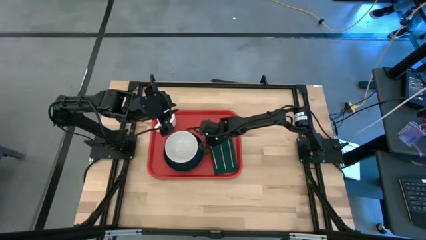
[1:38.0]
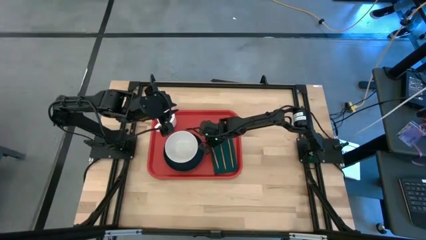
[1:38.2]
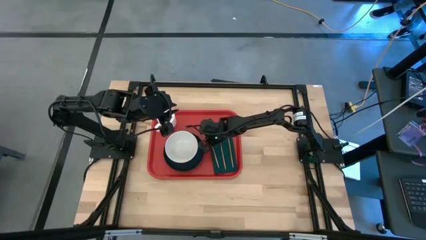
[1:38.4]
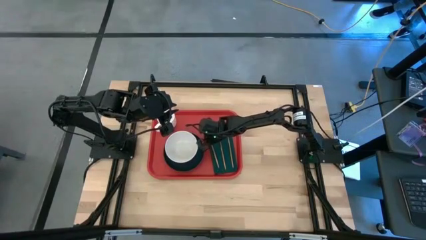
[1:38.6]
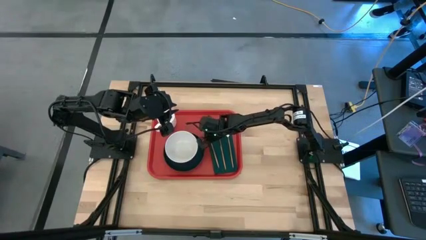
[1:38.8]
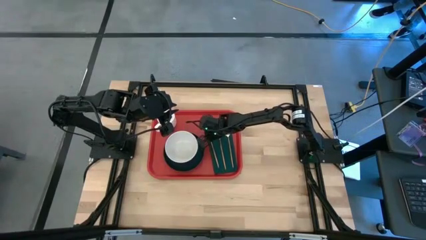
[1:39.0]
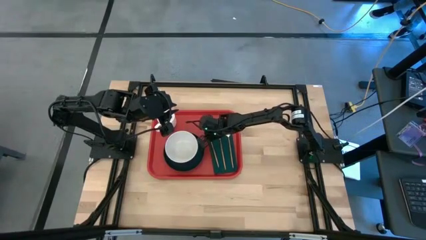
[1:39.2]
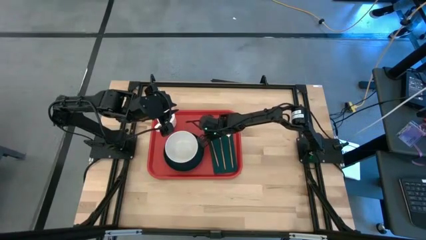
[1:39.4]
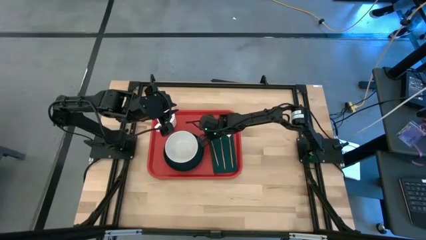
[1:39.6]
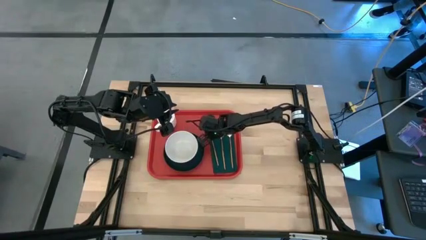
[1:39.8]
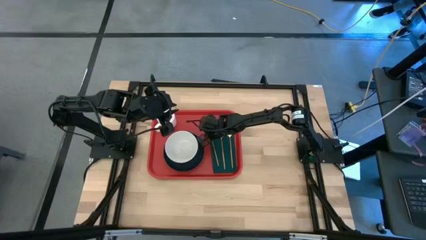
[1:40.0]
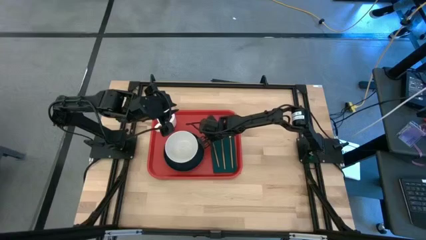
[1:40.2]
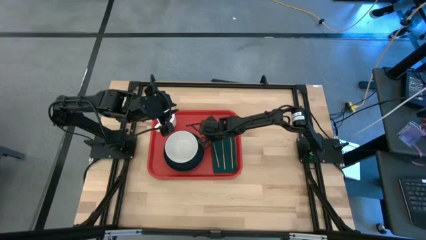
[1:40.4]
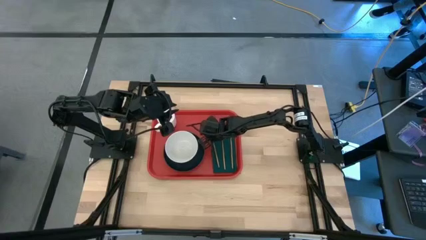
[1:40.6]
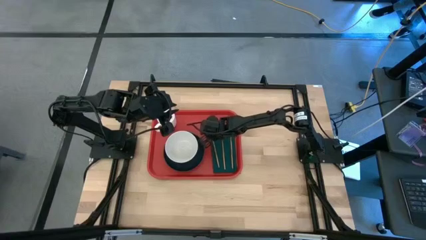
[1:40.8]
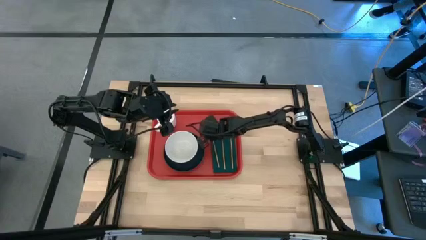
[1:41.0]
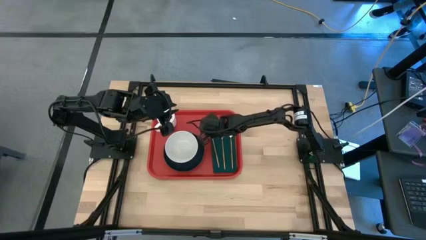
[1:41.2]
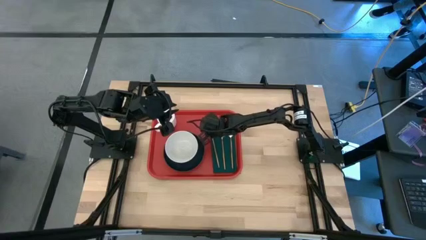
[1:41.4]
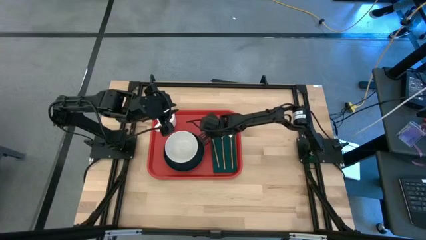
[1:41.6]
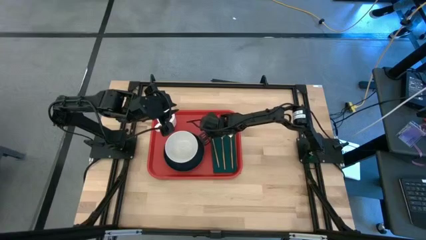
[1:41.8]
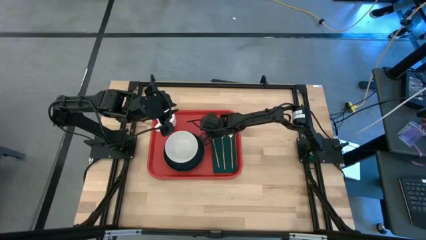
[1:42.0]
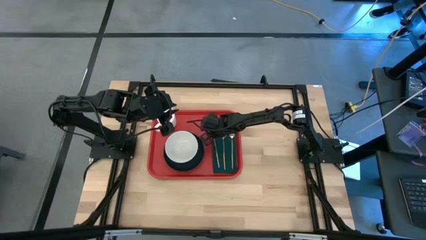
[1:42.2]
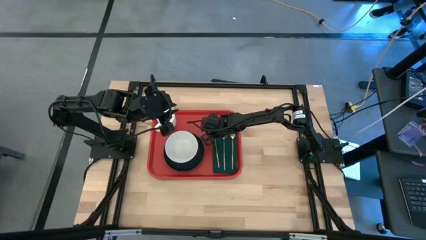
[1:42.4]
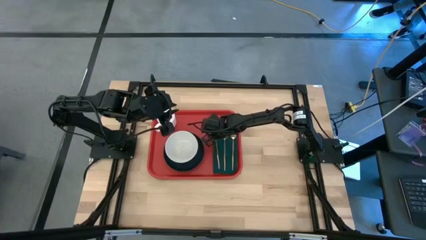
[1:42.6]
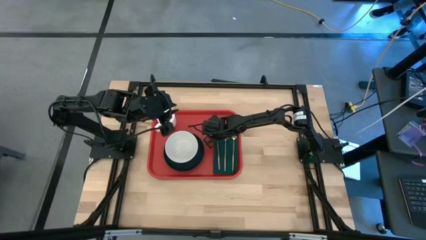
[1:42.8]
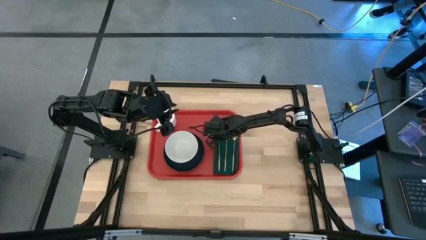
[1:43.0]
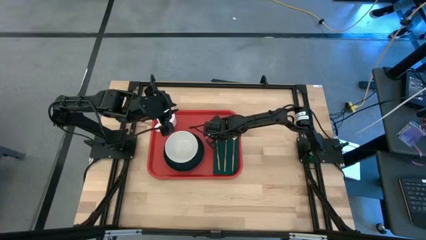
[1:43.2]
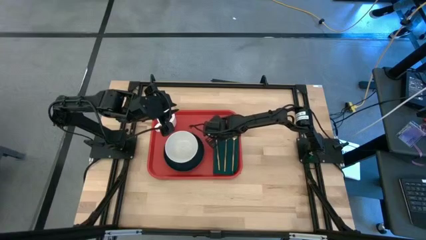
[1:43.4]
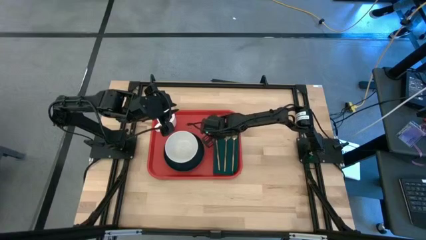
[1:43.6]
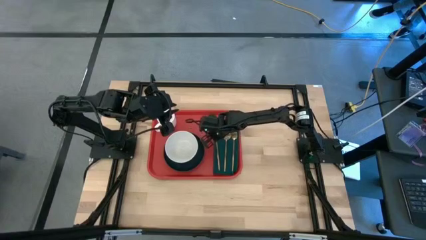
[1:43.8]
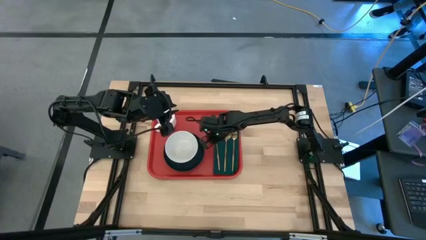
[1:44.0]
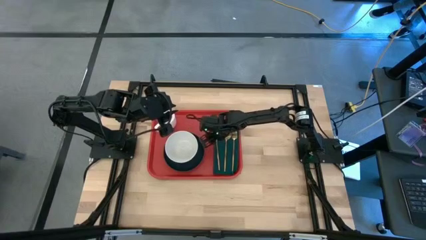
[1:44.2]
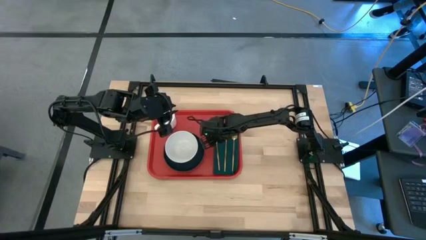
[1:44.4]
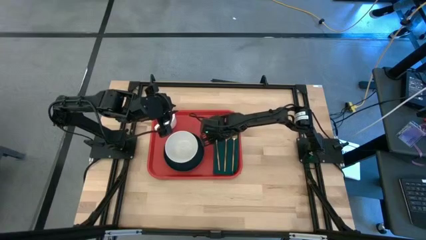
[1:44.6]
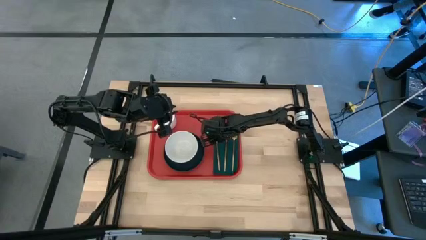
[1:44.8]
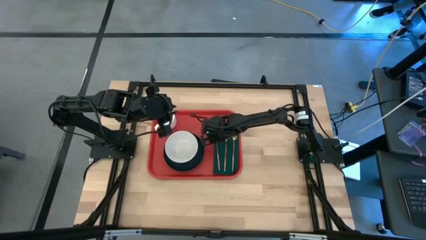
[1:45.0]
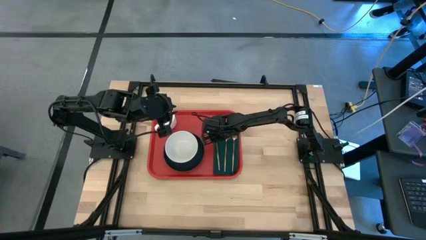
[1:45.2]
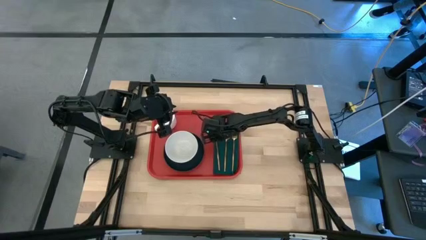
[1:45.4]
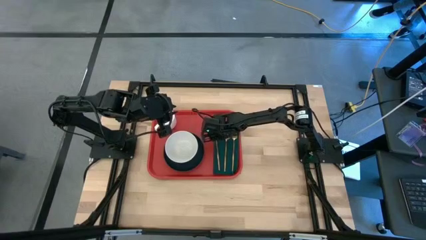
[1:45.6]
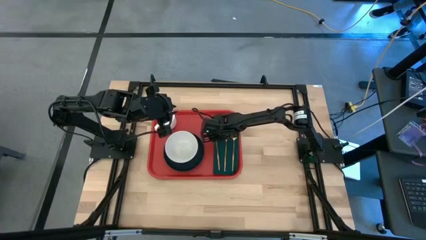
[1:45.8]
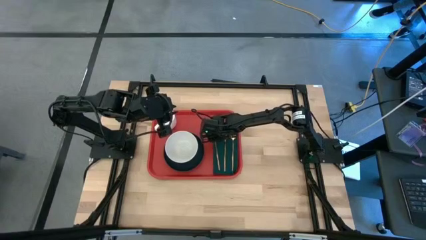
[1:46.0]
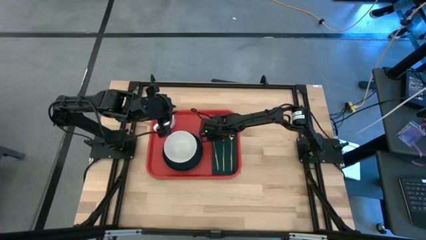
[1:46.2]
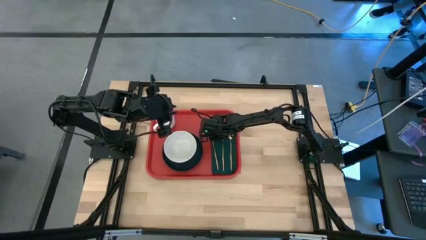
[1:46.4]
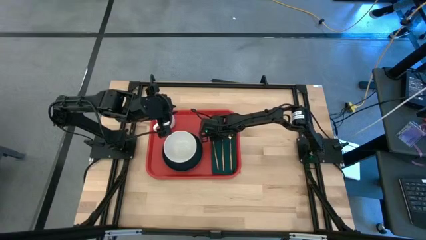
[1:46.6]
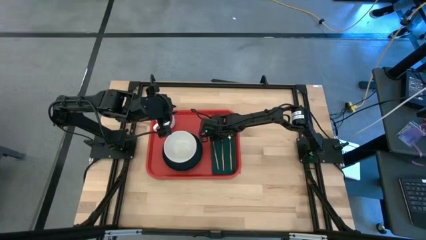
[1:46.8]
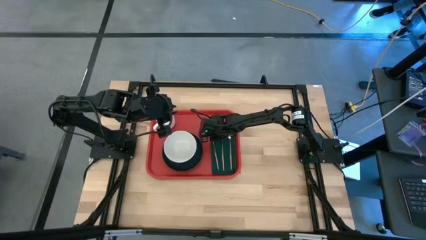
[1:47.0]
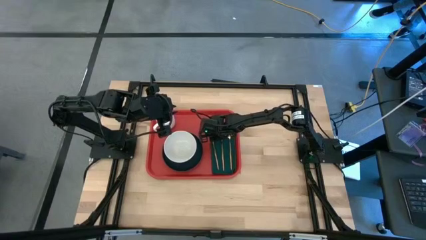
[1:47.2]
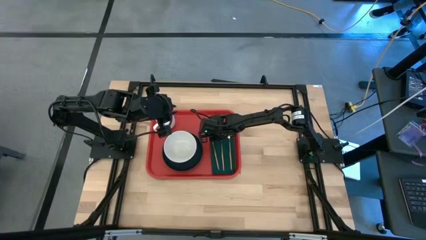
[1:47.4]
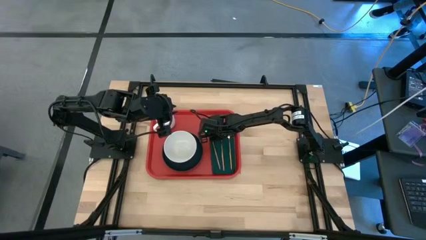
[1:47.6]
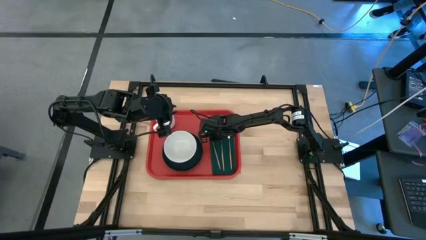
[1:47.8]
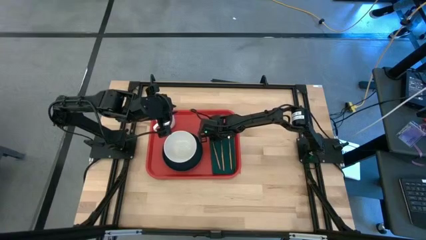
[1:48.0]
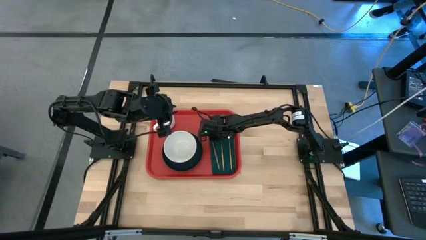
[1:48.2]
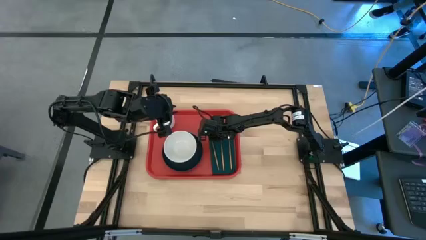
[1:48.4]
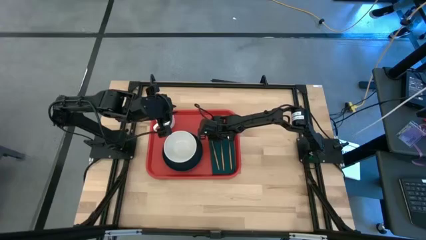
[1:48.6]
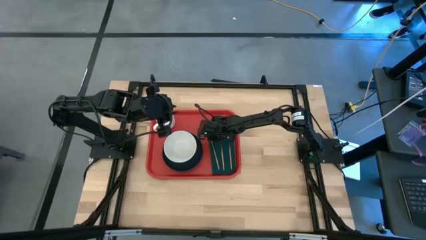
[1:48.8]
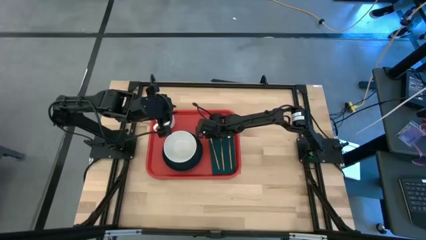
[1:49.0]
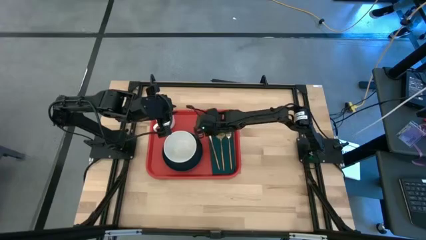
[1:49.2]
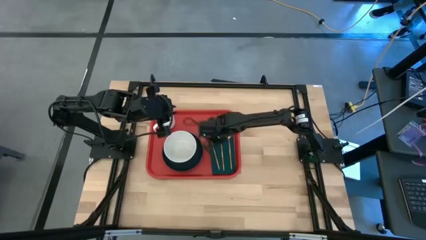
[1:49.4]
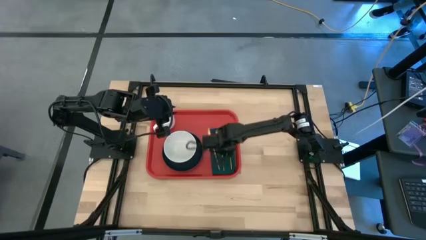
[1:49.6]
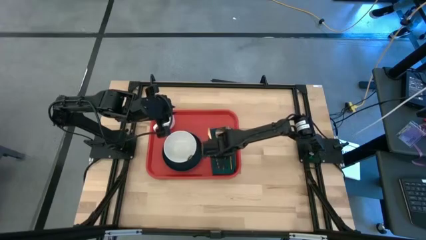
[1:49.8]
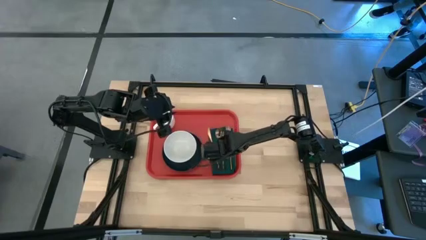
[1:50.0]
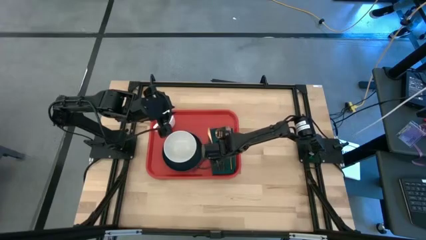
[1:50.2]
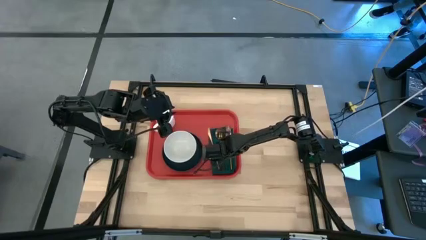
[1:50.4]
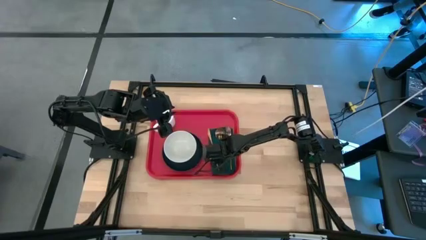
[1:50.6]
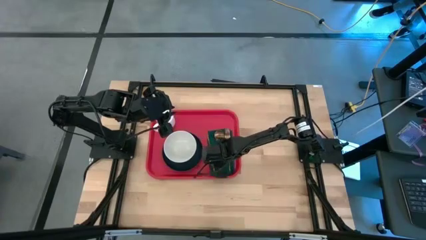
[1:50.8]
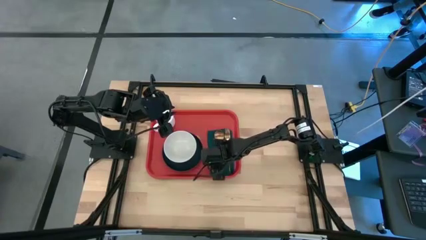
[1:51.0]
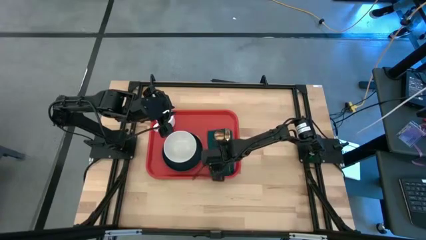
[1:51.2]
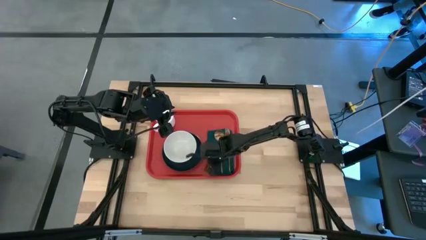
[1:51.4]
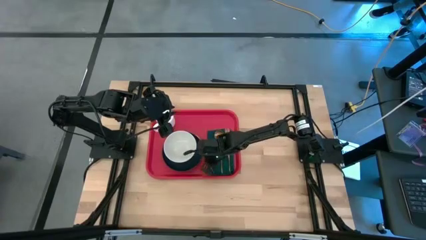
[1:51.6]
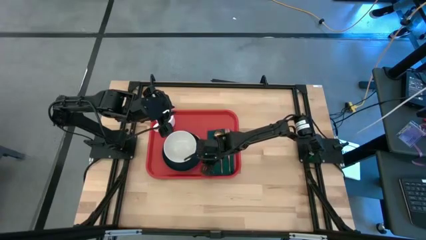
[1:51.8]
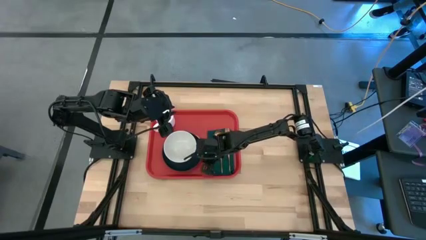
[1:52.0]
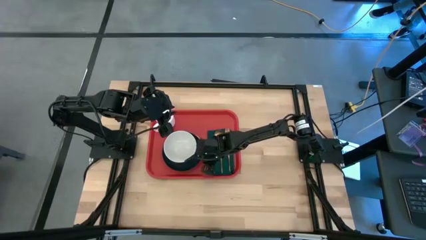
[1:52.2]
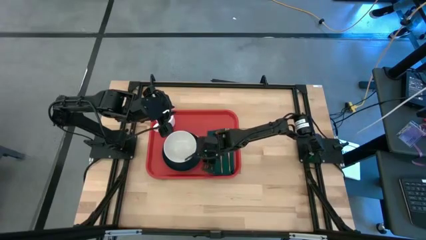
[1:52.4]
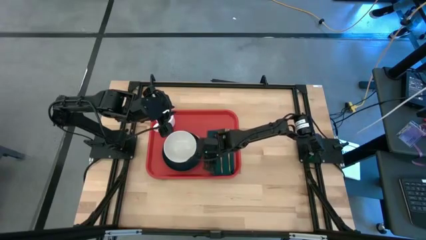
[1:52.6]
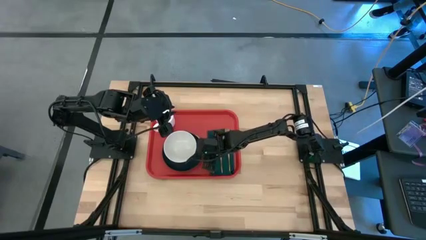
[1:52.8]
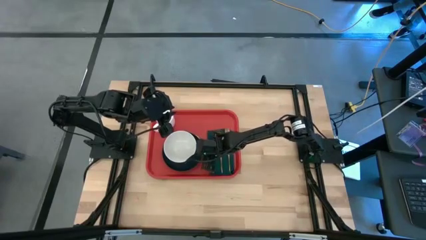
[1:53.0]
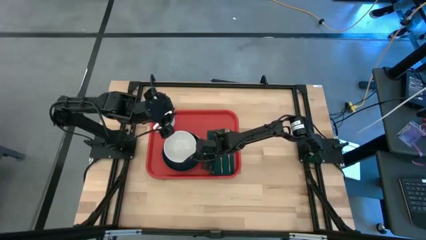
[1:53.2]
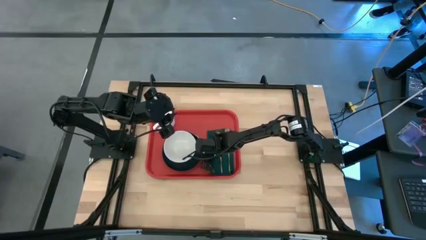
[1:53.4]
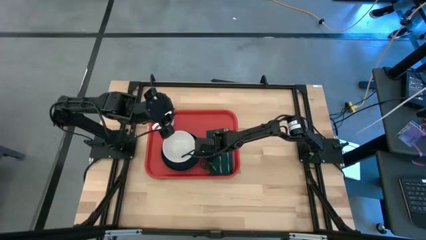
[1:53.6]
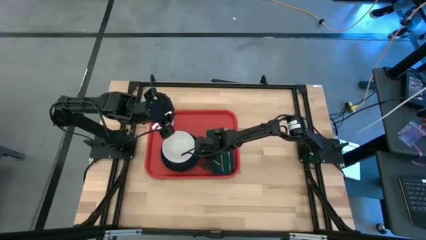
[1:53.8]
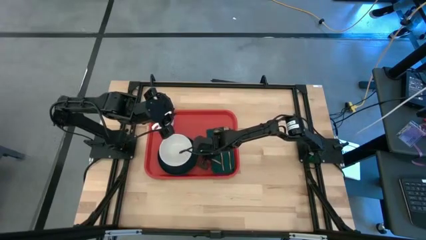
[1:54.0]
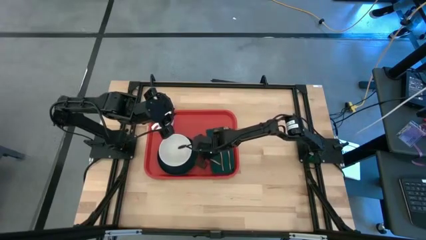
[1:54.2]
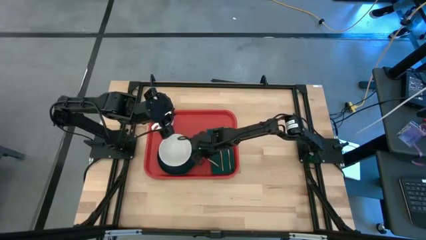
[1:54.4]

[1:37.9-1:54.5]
Task: Set up tray
Put the gold knife to the left of the gold spoon on the green napkin on the red tray
